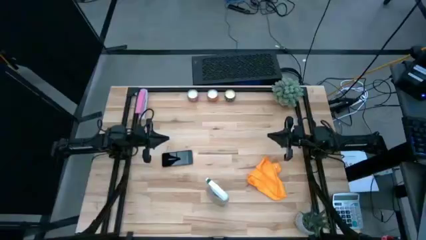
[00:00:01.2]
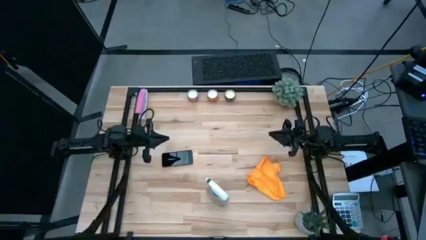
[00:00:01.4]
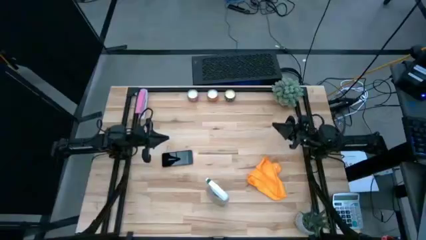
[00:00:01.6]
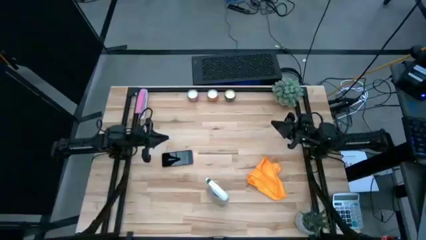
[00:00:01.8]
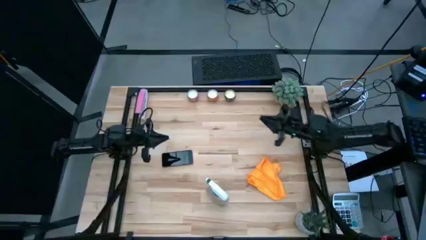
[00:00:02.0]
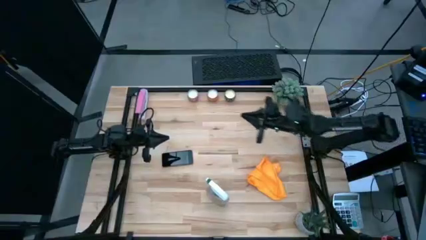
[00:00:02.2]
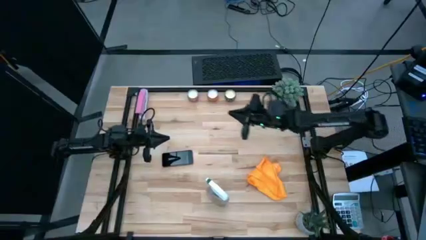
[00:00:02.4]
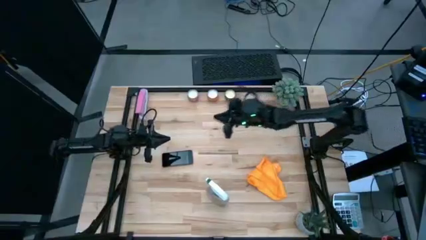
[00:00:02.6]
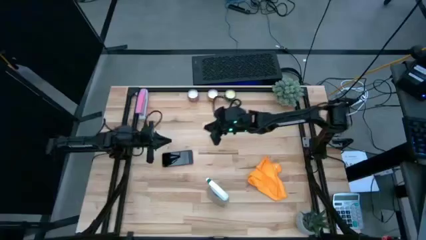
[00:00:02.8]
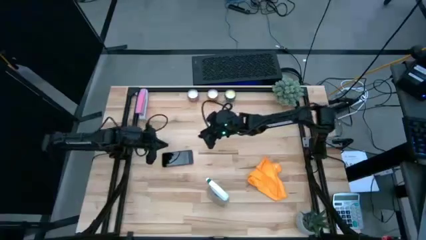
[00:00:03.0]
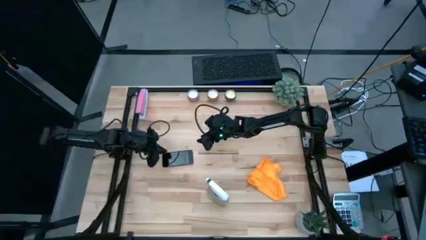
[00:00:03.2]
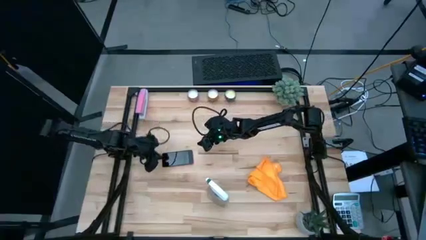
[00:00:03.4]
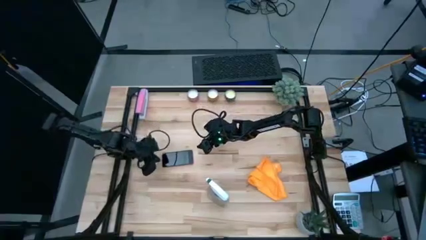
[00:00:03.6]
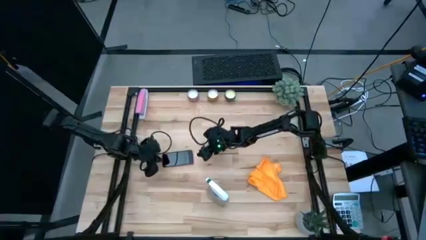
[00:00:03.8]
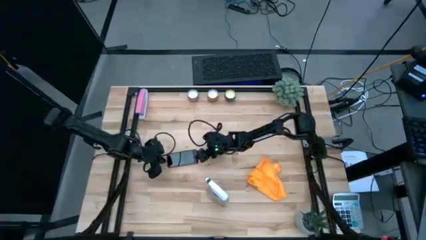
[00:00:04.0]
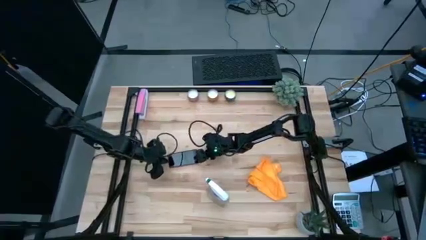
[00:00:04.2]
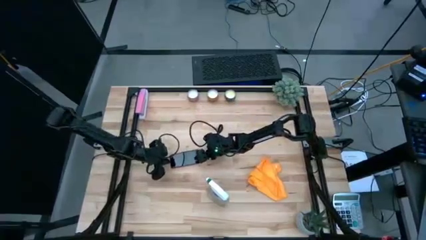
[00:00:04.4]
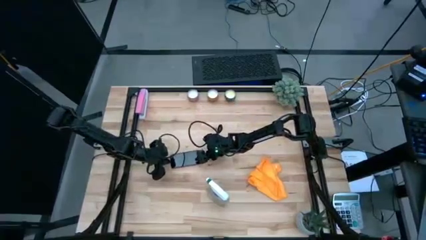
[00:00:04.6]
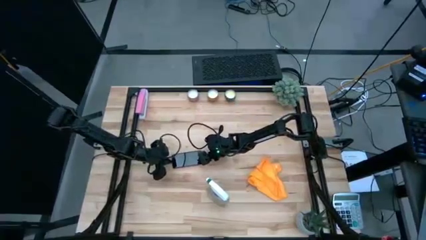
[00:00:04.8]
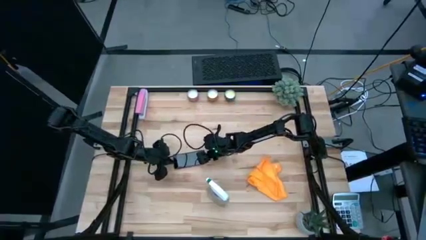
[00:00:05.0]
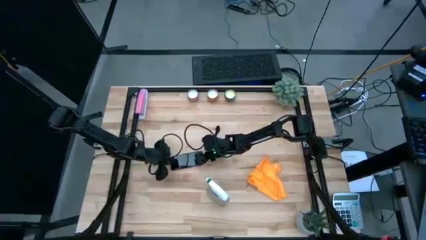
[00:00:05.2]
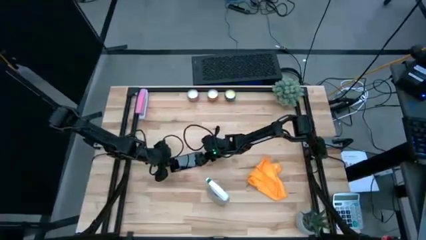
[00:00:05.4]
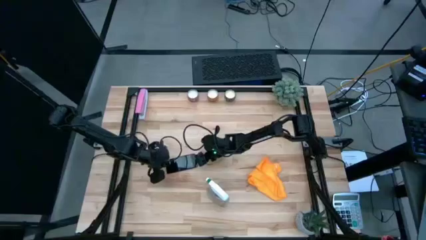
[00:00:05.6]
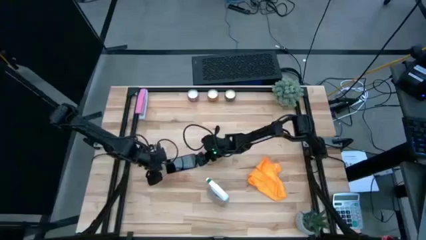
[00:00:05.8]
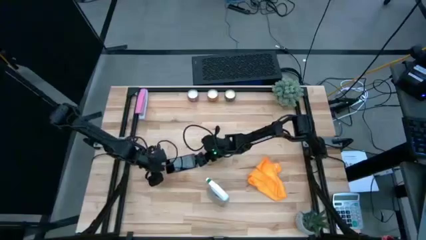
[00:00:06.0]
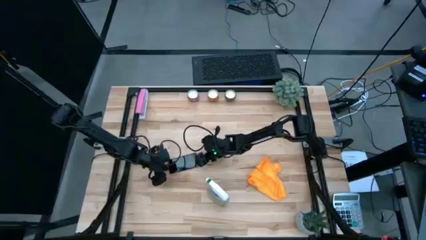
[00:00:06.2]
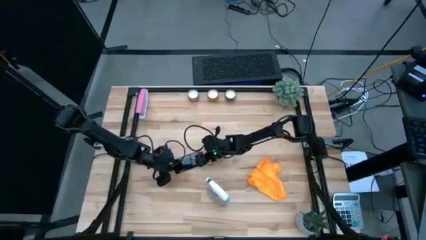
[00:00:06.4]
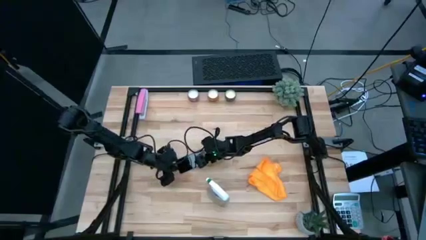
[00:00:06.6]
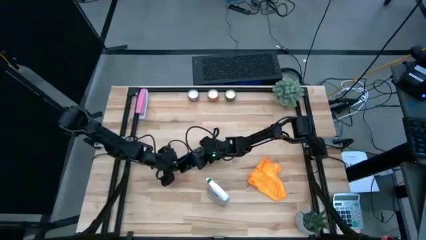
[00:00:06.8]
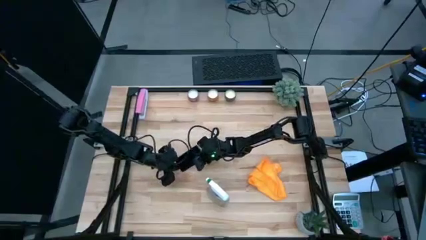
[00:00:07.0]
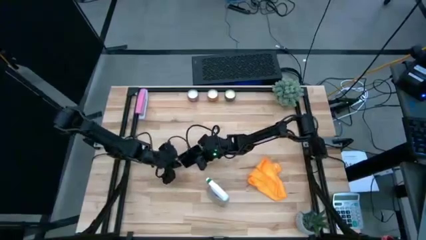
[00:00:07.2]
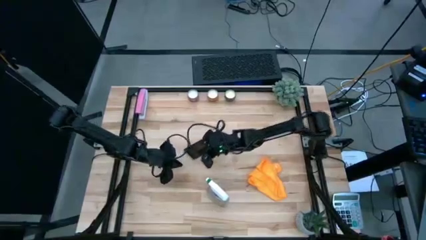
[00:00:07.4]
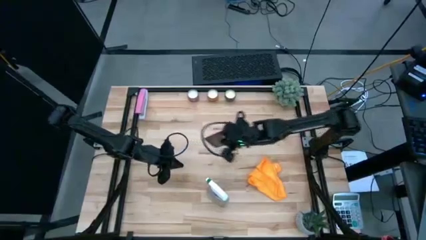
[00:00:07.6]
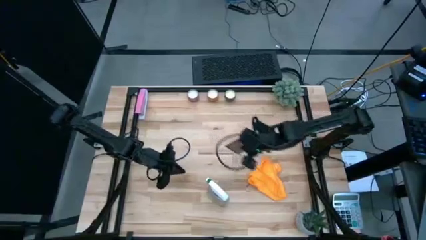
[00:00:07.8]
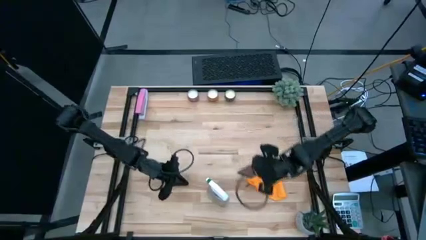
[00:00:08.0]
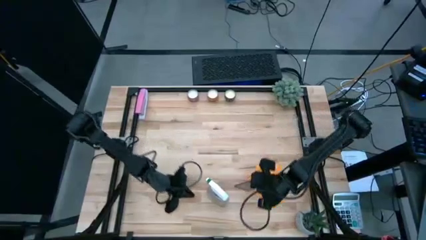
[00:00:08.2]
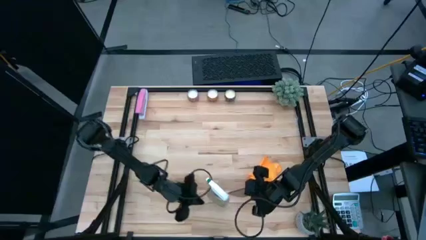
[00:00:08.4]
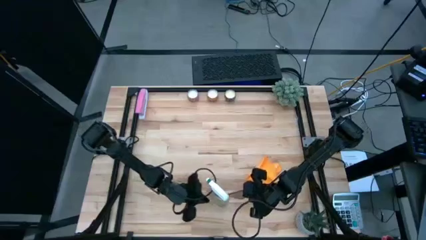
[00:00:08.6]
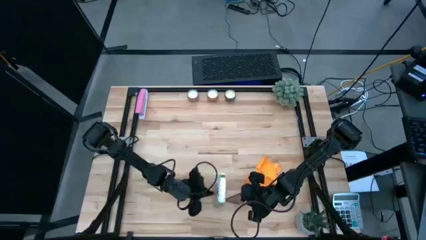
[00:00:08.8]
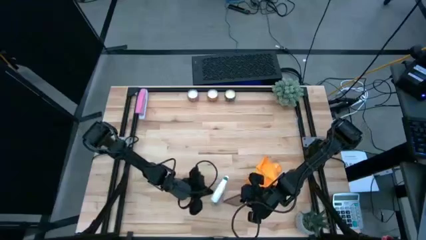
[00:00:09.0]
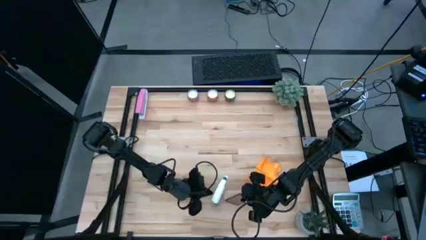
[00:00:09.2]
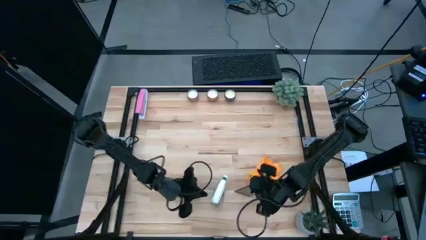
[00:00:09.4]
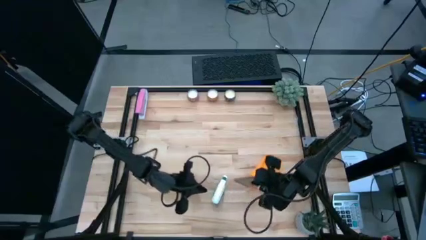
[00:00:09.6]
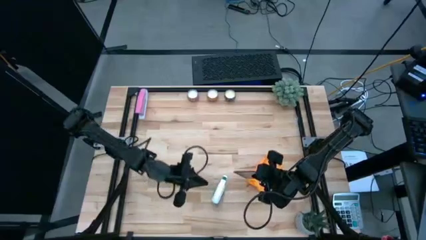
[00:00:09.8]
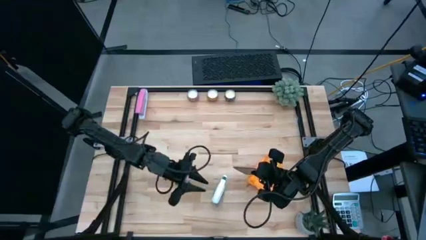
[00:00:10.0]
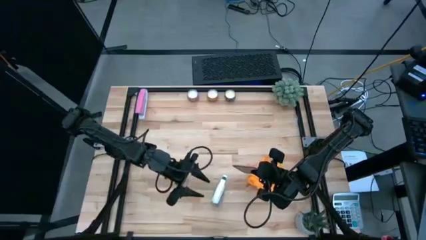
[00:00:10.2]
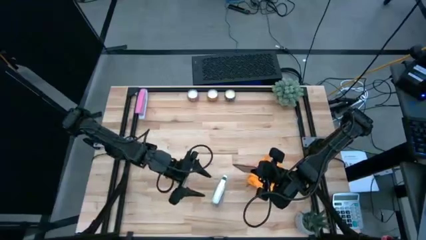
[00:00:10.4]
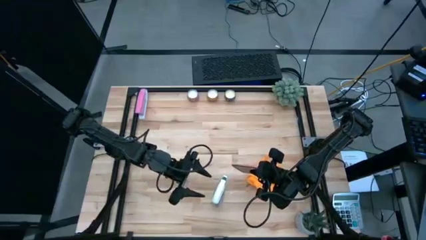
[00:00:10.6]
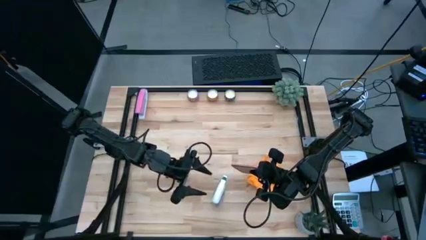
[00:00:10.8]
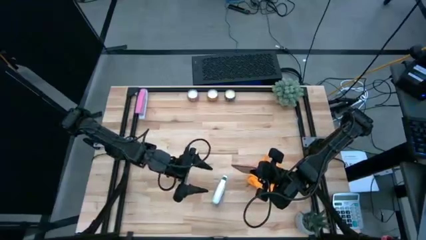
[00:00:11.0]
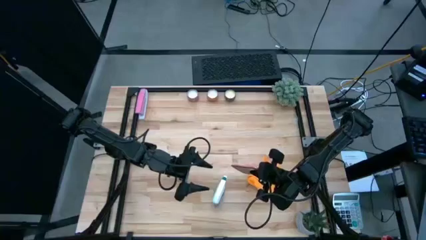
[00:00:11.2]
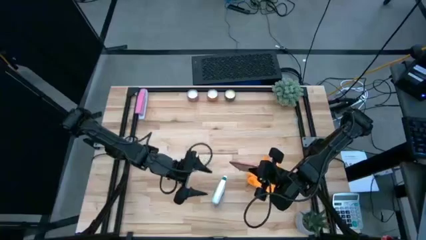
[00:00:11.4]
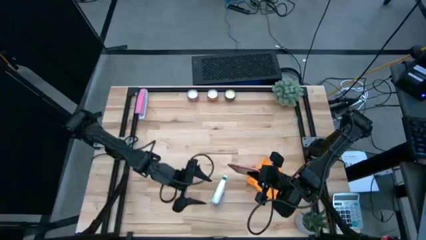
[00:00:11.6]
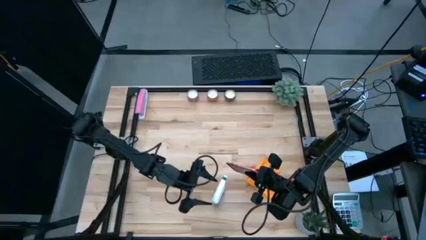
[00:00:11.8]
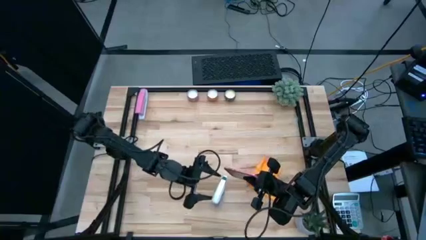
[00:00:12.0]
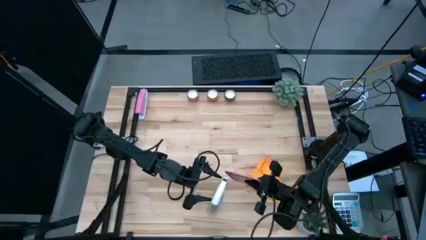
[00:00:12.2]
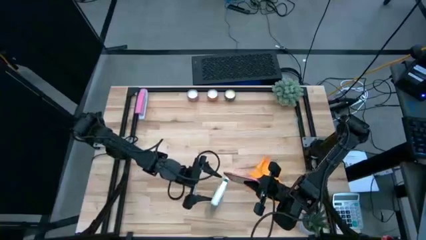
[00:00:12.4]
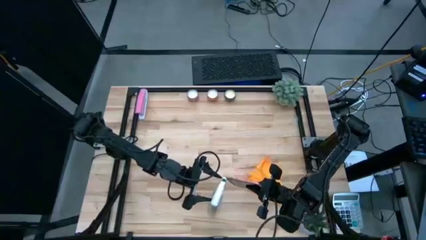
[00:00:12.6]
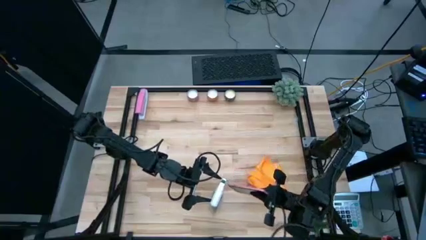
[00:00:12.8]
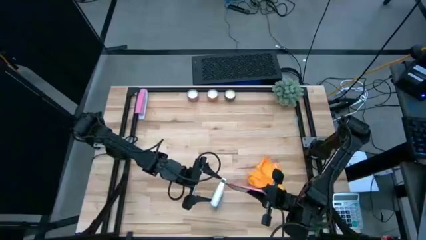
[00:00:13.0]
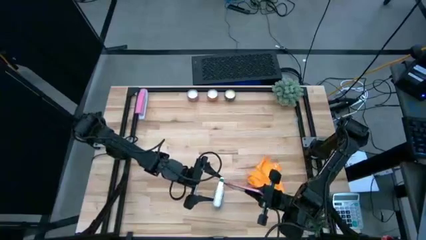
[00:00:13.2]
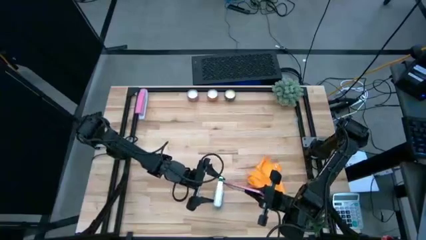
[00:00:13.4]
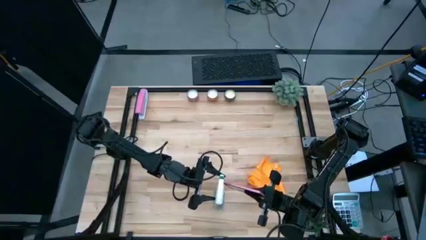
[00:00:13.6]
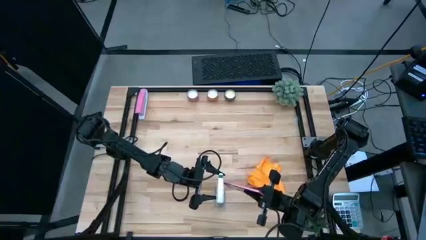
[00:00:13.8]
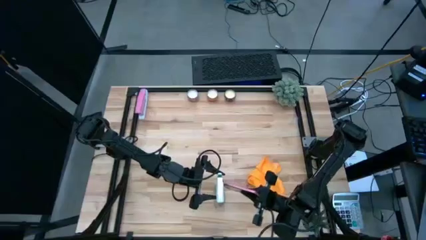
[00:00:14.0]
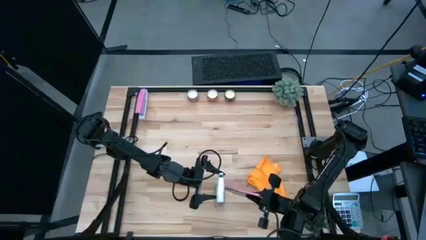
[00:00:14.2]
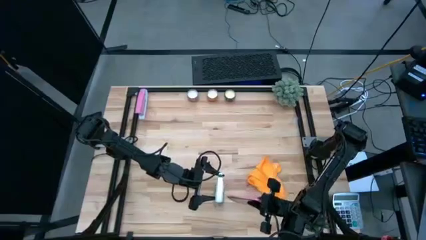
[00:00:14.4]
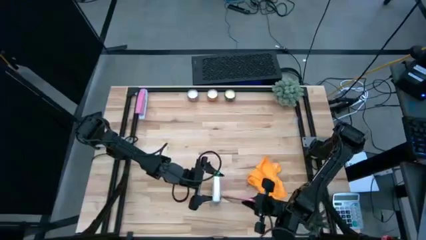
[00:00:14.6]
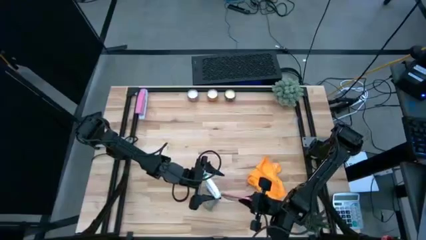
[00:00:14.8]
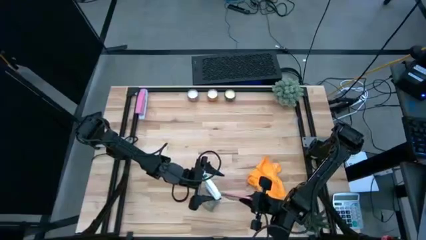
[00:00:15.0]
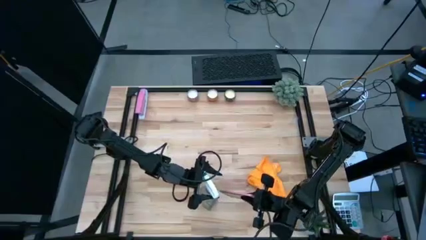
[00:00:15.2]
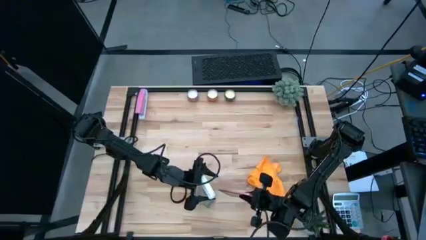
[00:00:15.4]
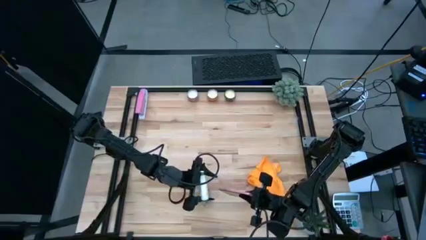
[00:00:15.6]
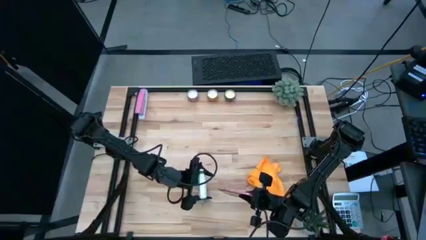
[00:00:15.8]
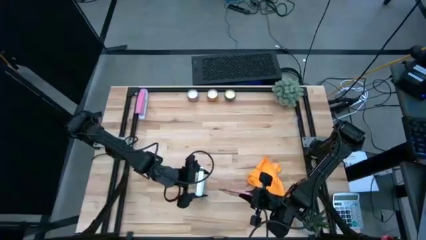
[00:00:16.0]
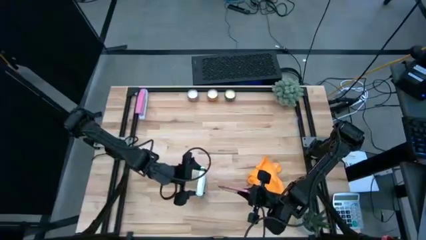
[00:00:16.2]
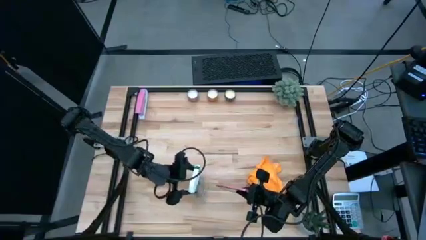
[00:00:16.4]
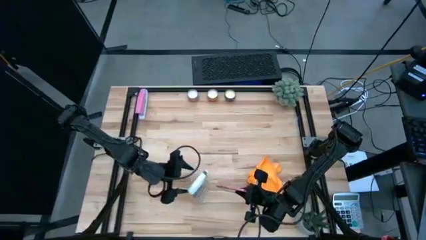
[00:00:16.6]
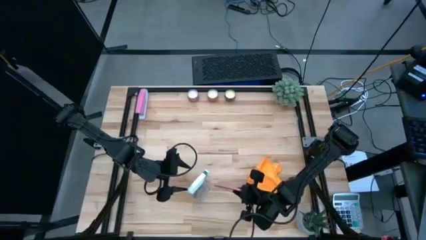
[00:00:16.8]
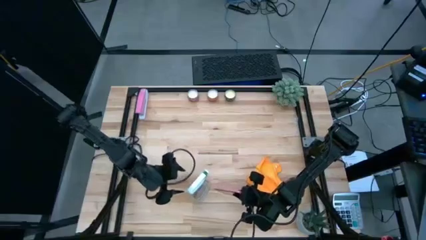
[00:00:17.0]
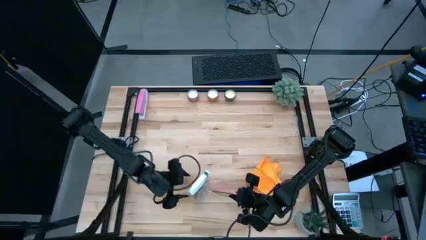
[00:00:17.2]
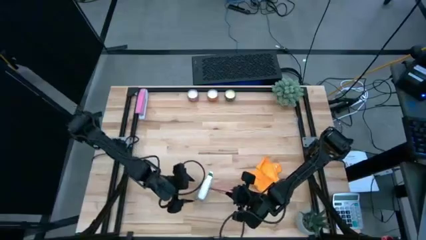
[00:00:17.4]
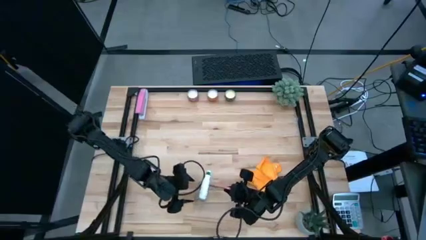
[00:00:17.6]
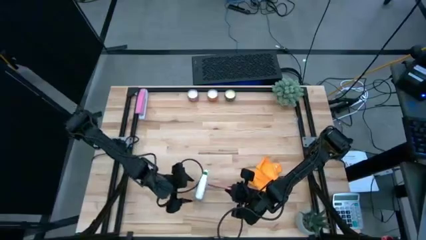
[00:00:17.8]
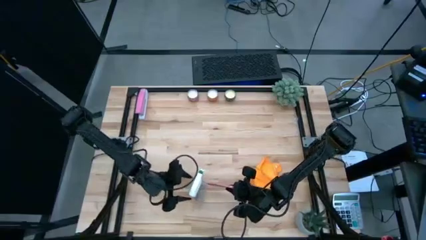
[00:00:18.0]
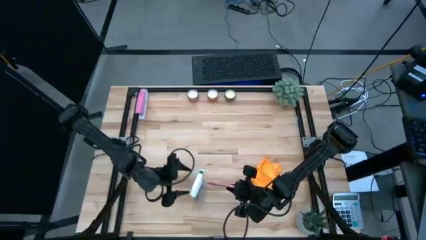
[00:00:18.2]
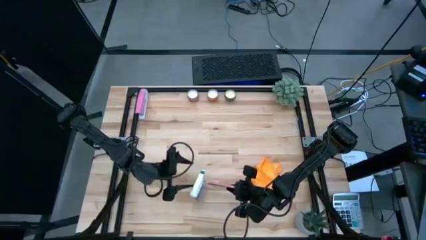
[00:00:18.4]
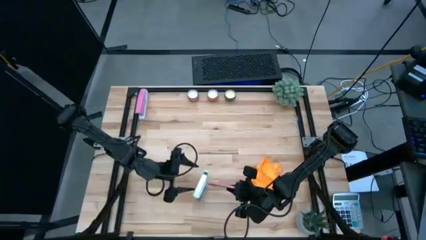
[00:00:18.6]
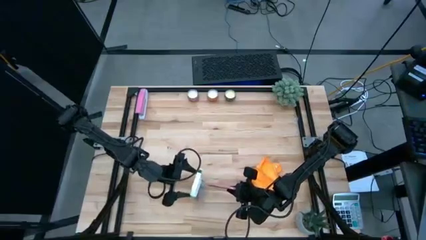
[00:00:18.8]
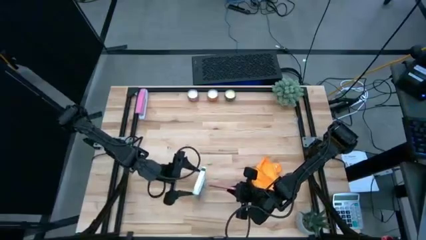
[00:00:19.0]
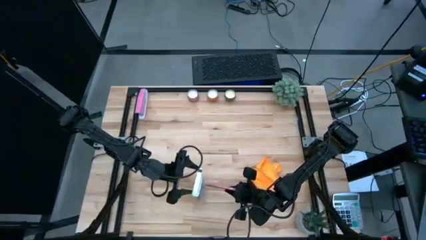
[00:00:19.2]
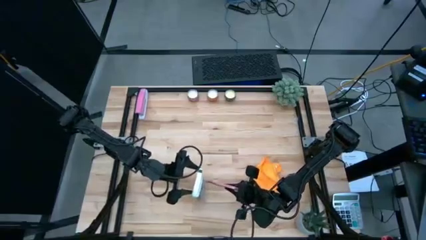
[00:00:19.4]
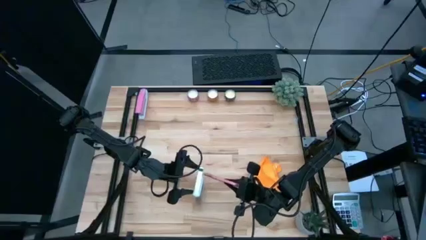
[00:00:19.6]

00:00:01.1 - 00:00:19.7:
Task: Apply microfiber cloth
Spray the front of the cellphone with a spray bottle
